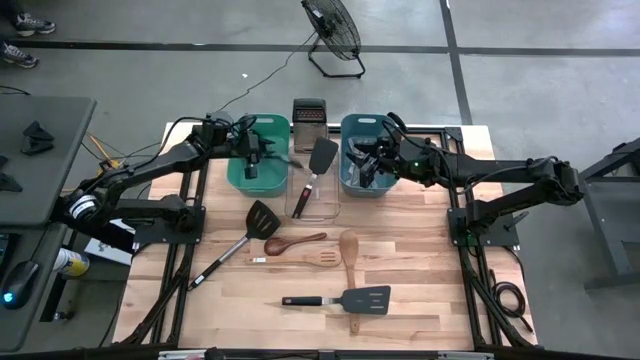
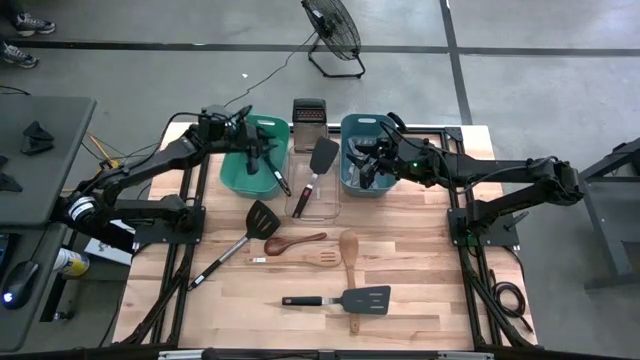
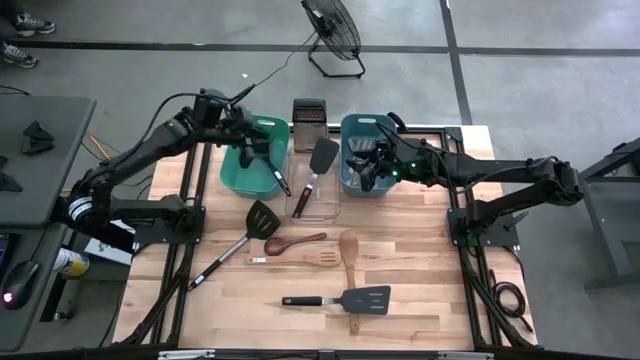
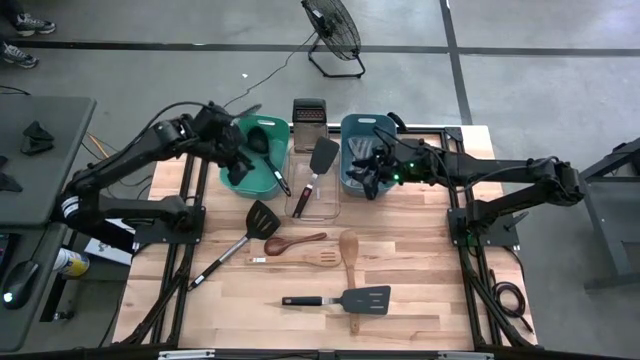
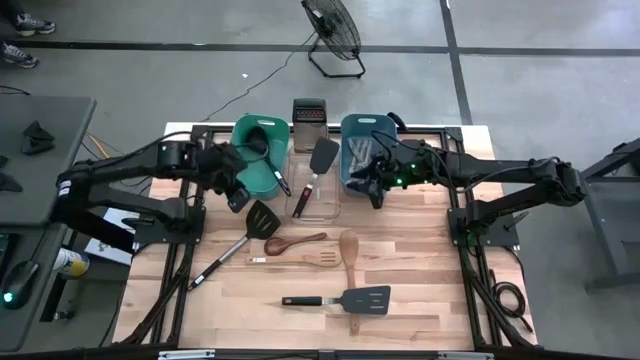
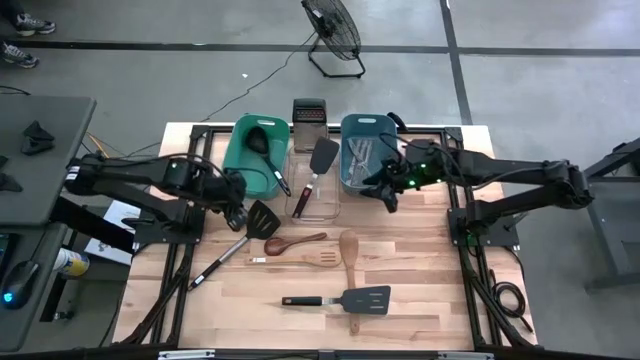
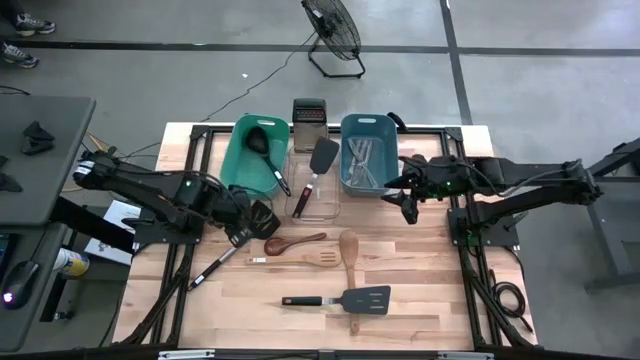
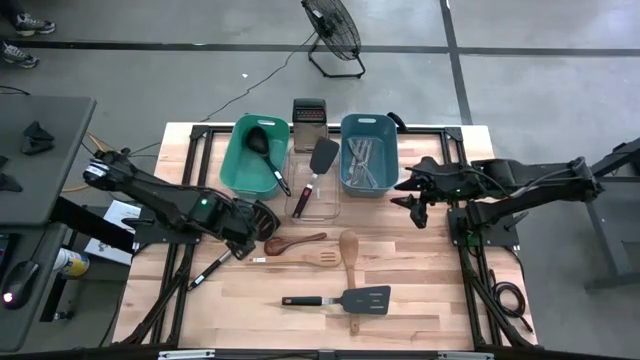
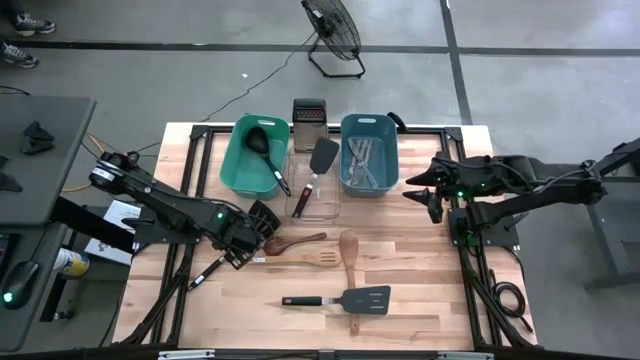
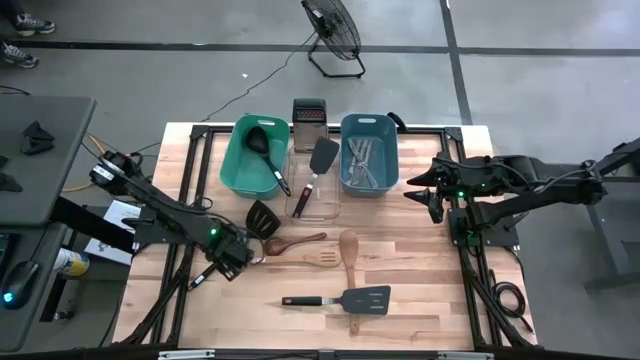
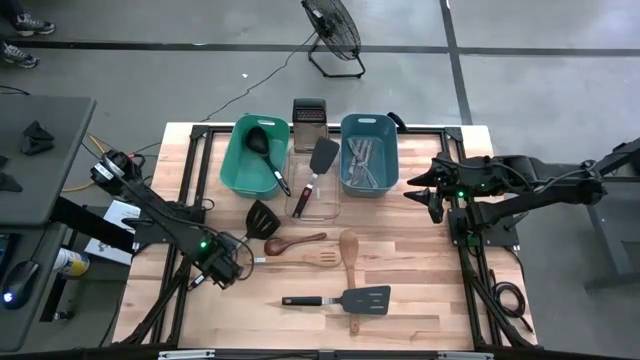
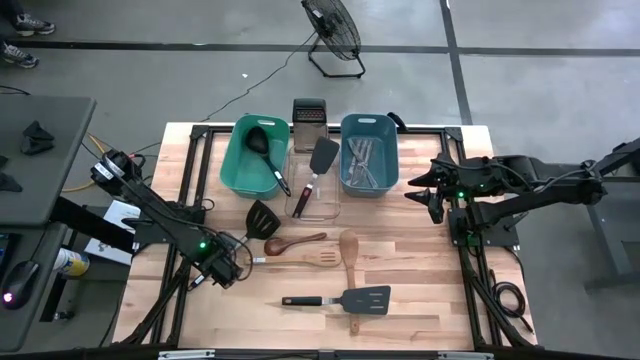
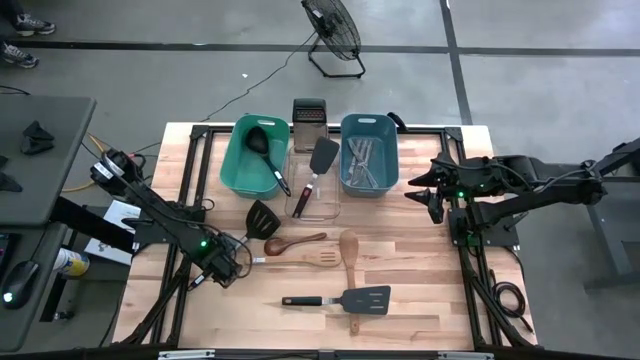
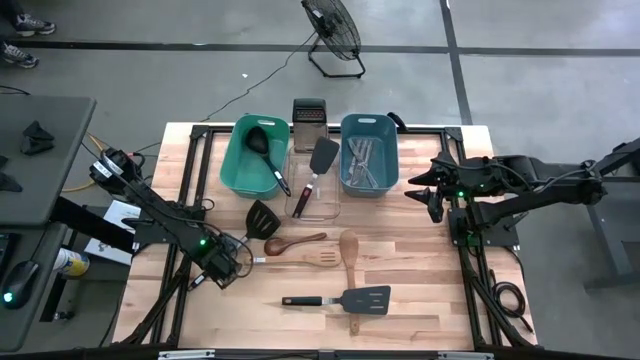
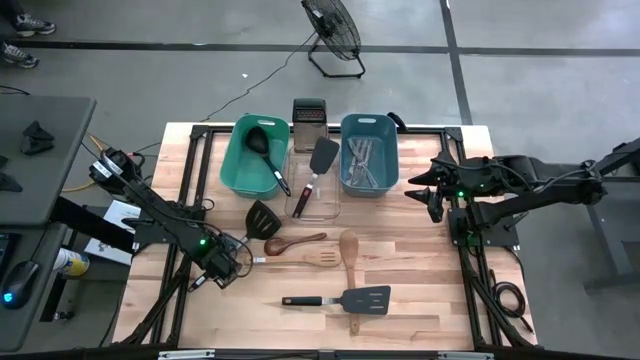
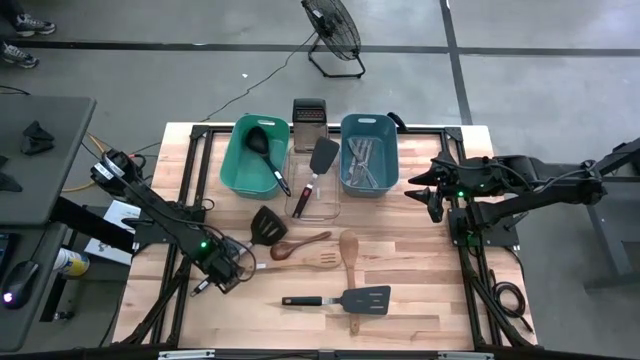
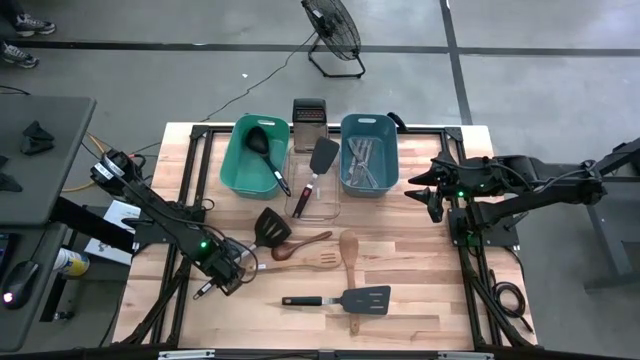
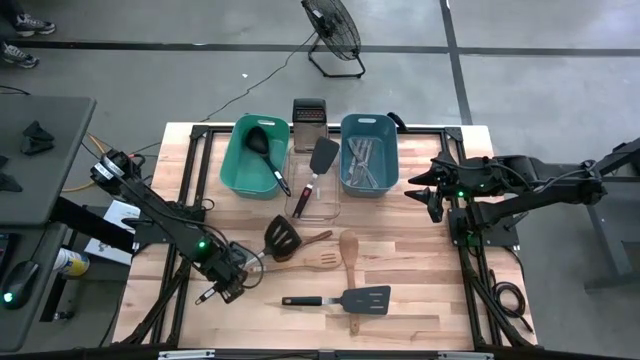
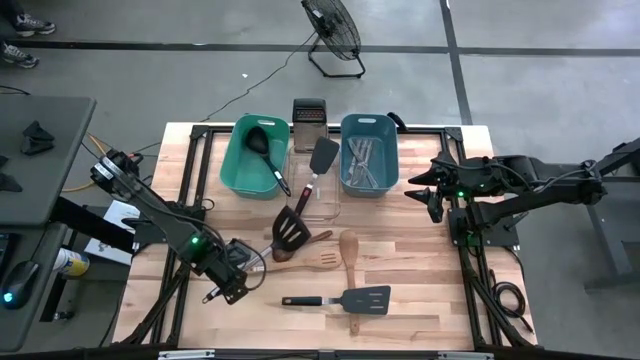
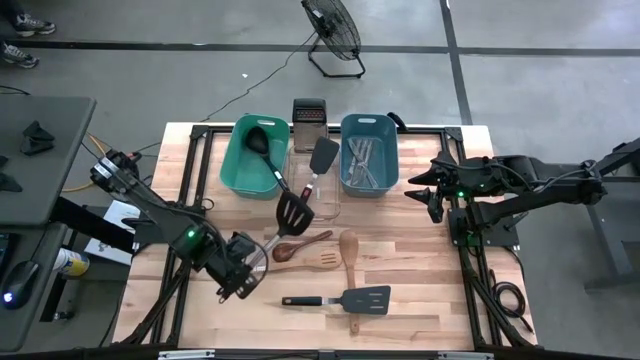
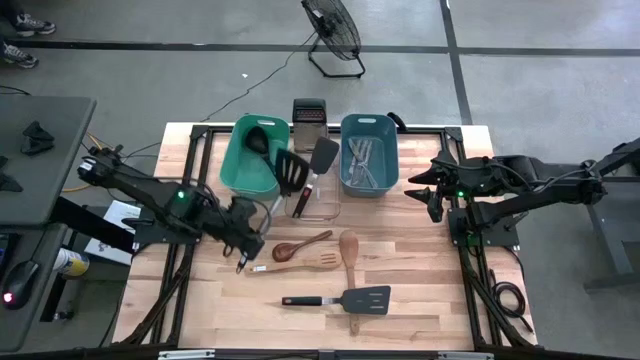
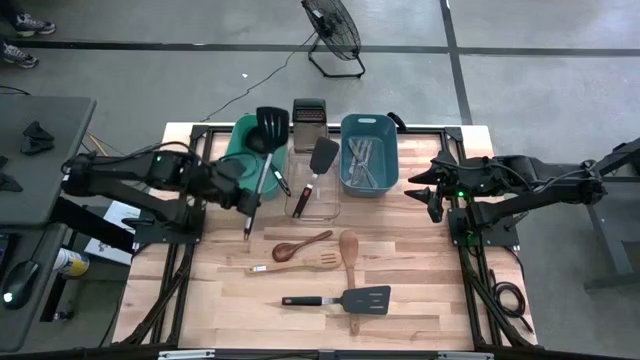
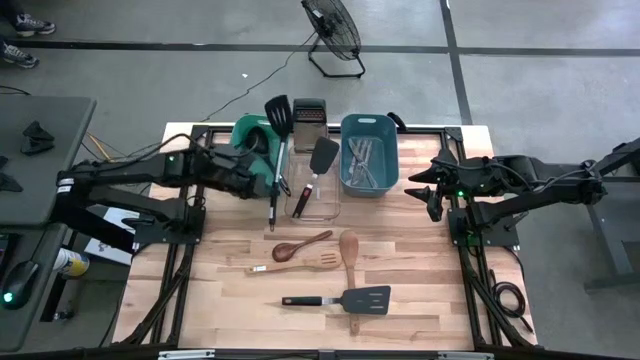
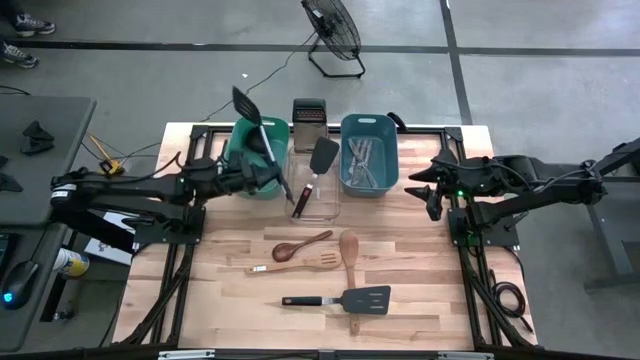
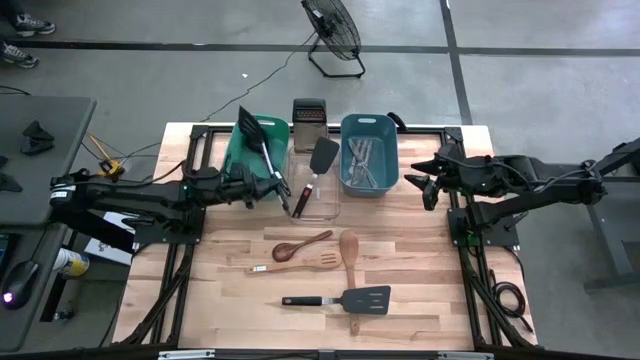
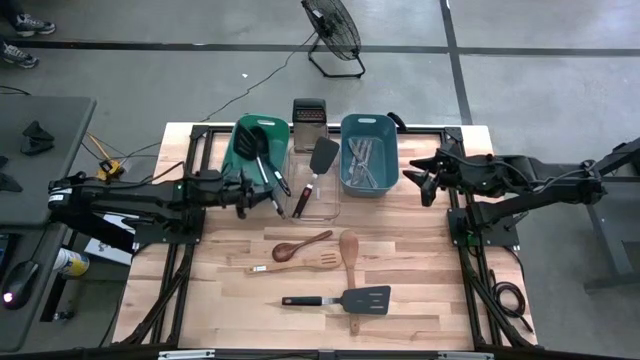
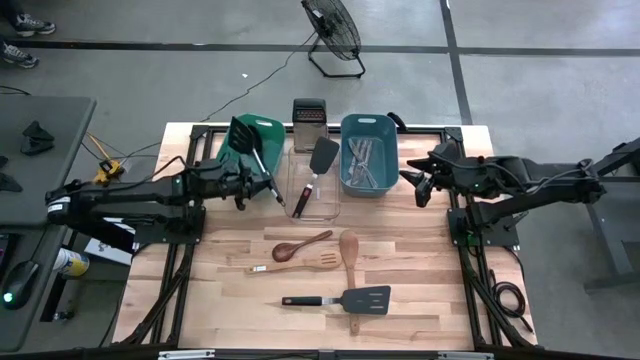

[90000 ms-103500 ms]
Task: Pick & Place Kitchen Items
Put the left slotted spatula into the green bin

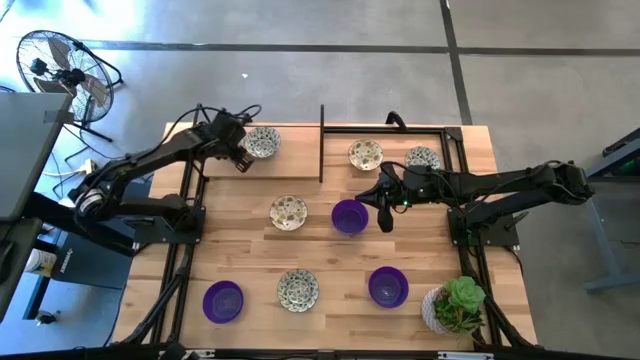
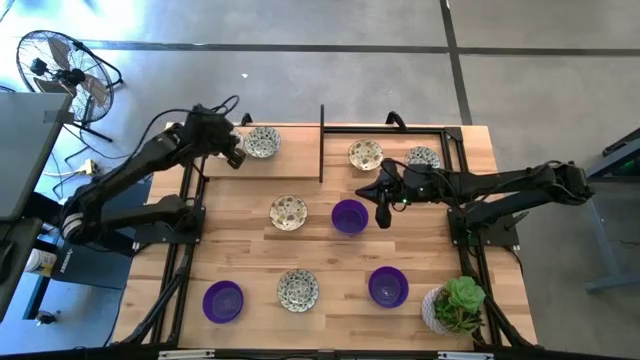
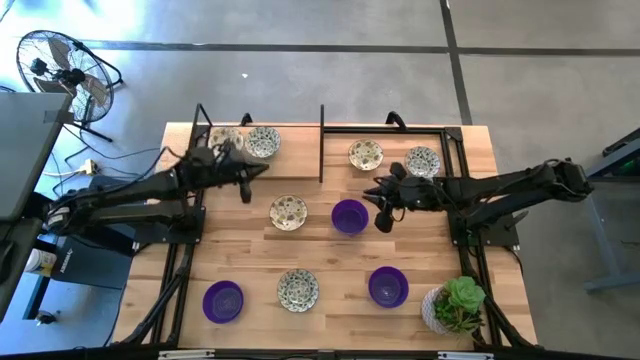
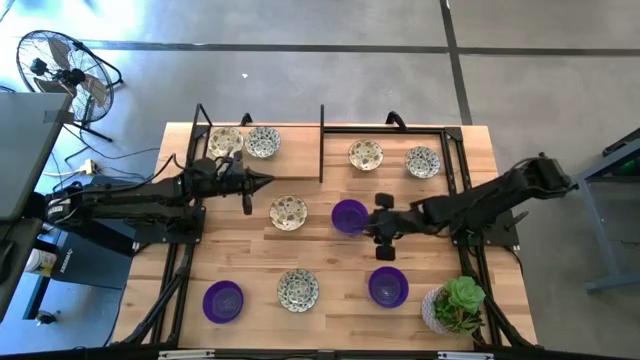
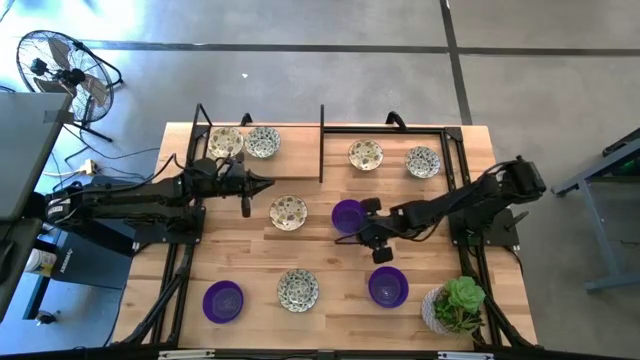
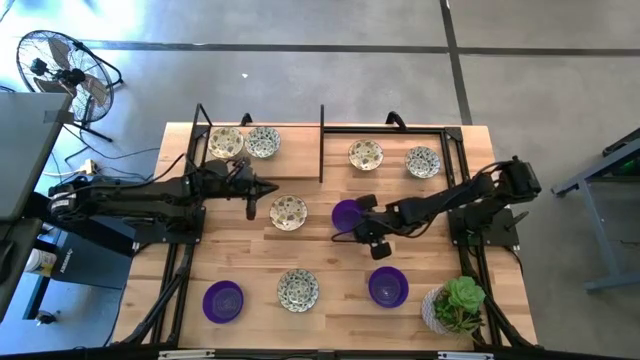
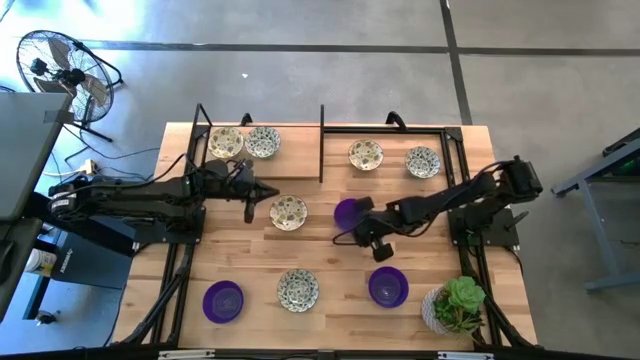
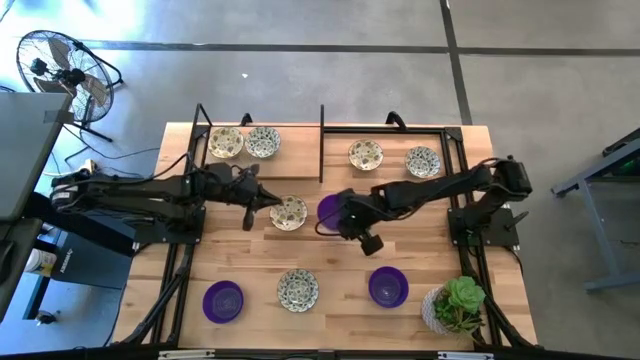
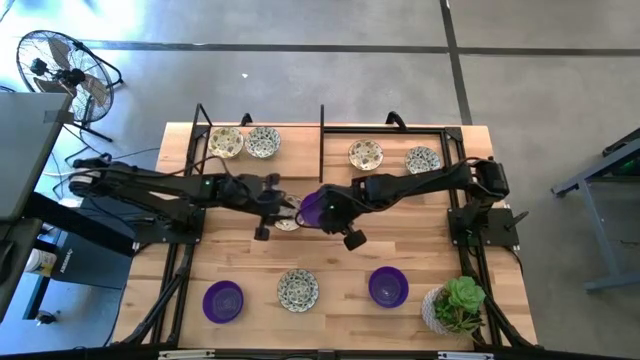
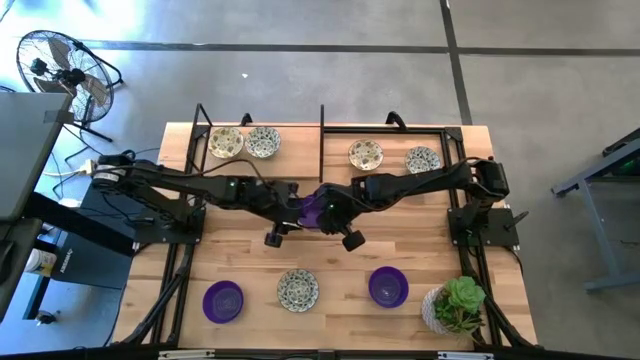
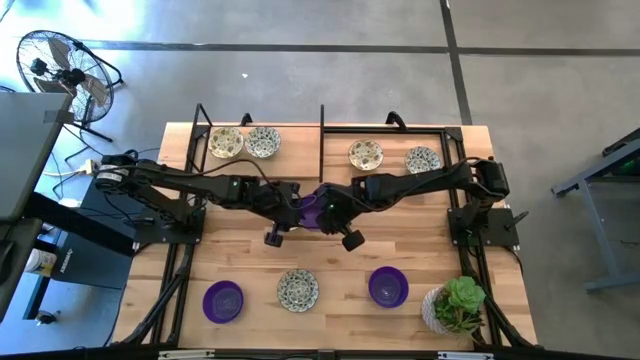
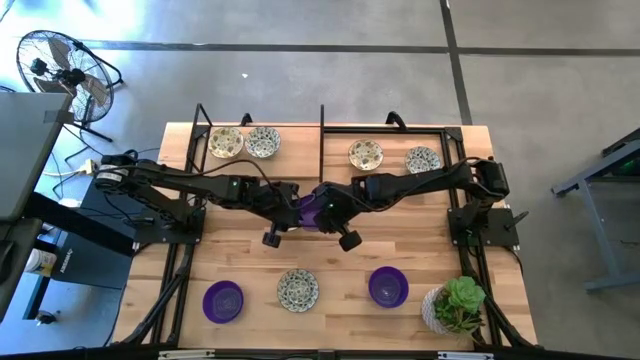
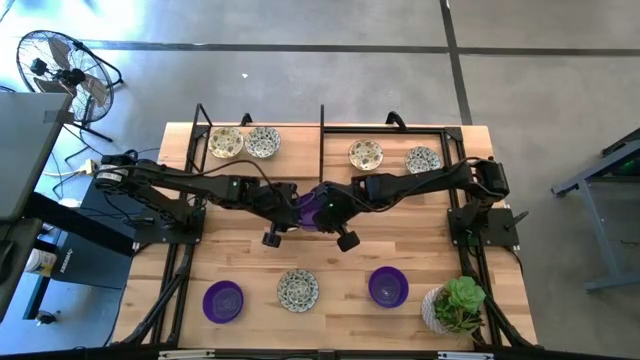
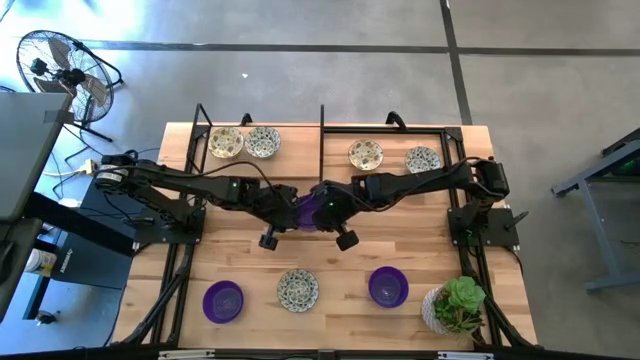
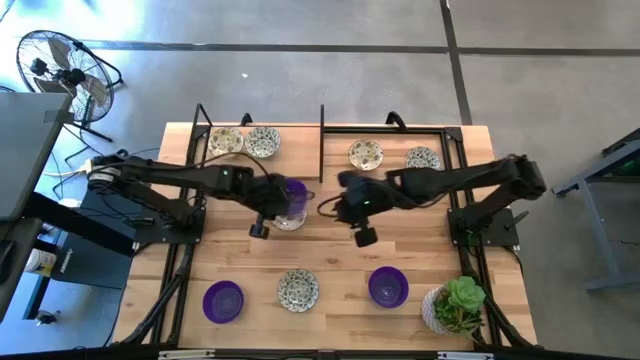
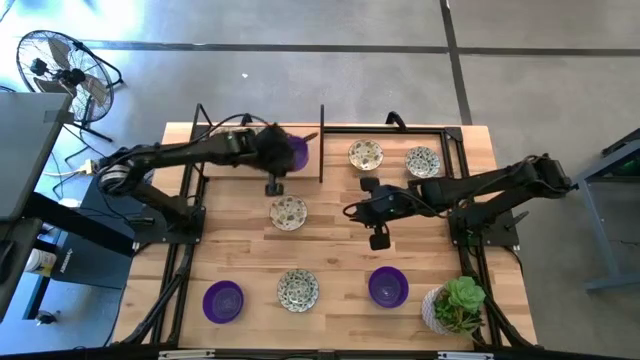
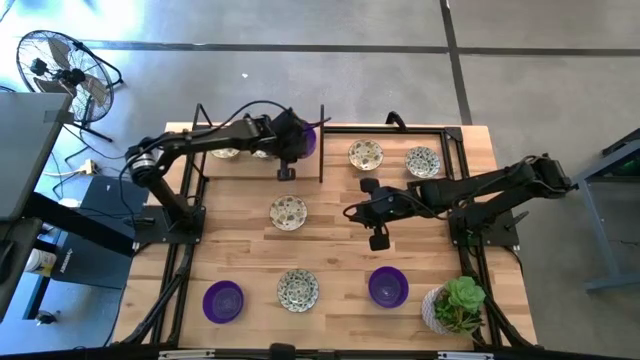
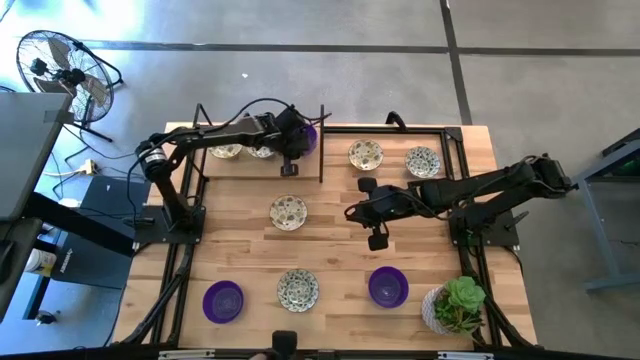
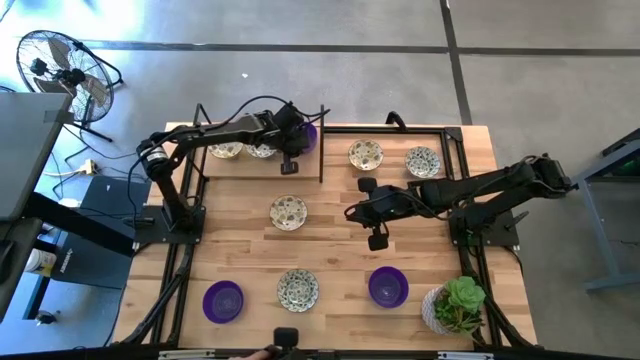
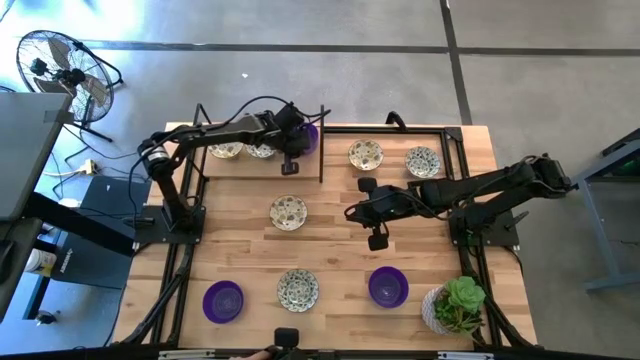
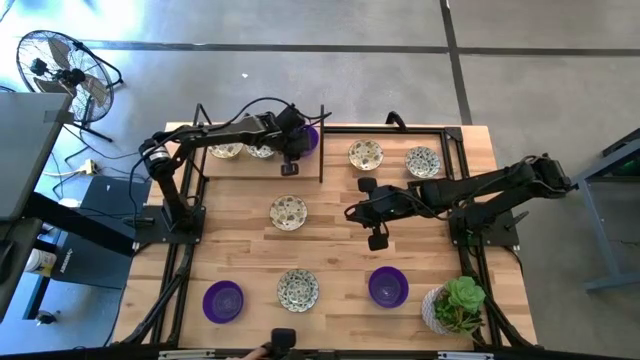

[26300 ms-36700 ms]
Task: Pick & Place Mini bowls
Put the top right violet bowl on the shelf
